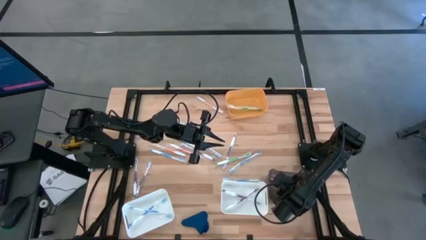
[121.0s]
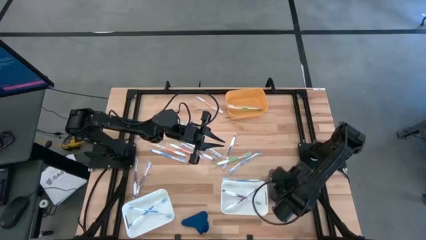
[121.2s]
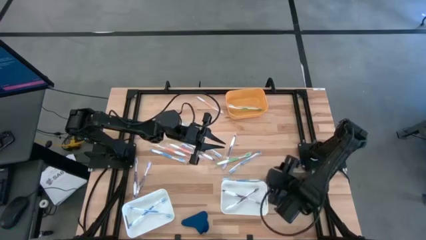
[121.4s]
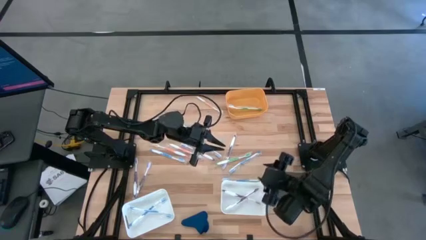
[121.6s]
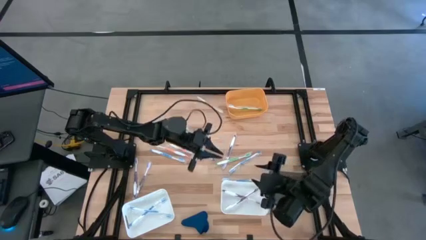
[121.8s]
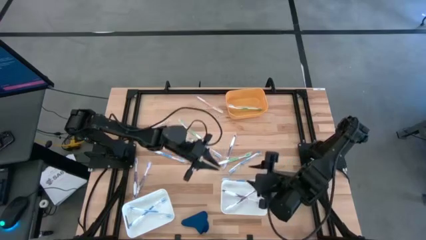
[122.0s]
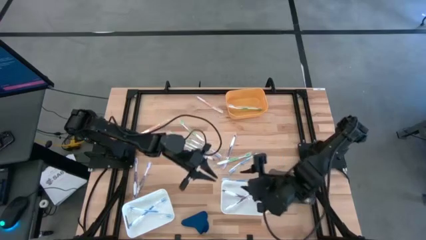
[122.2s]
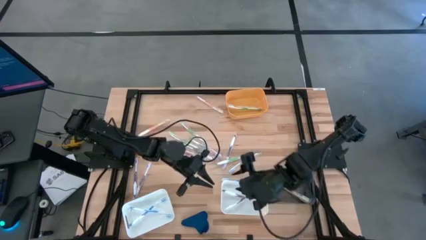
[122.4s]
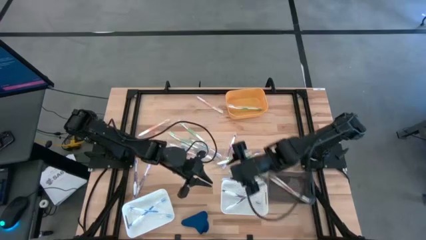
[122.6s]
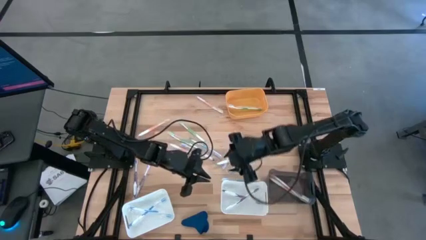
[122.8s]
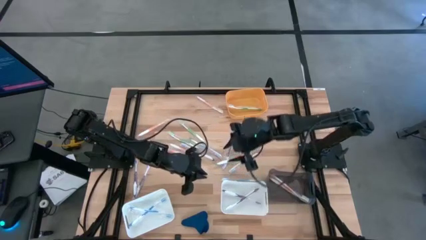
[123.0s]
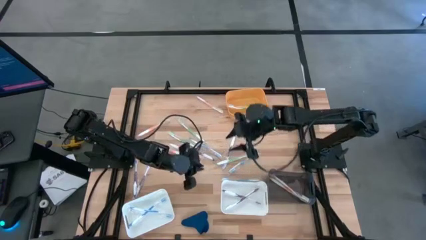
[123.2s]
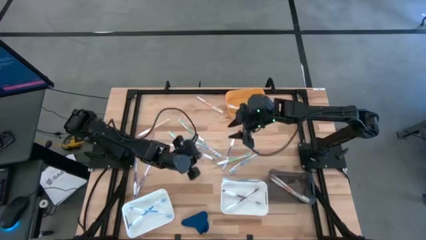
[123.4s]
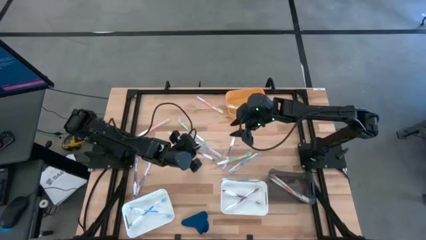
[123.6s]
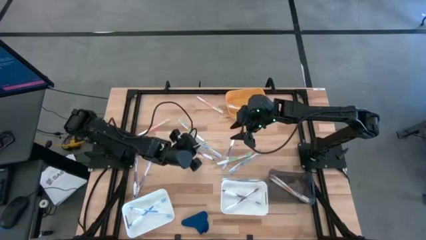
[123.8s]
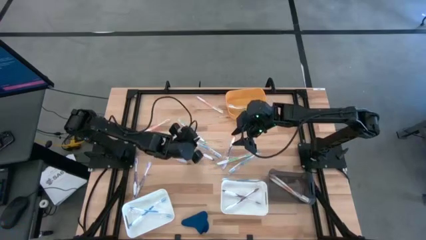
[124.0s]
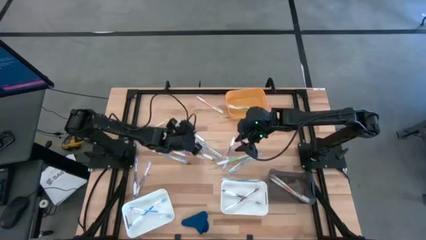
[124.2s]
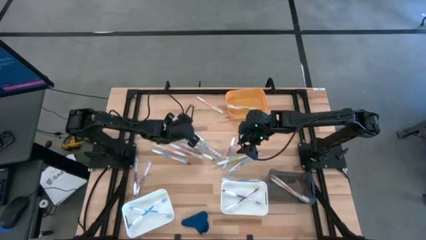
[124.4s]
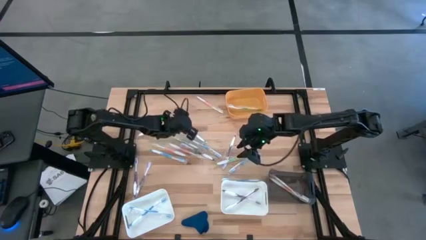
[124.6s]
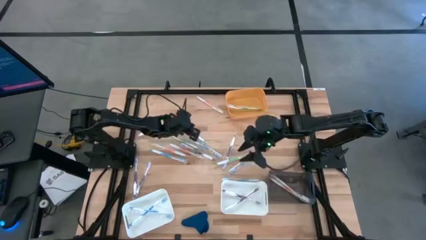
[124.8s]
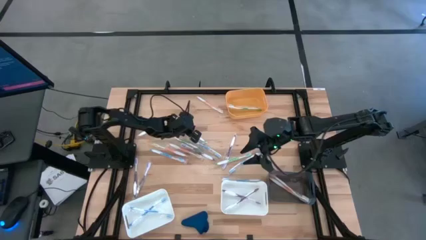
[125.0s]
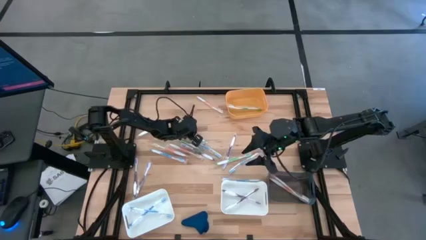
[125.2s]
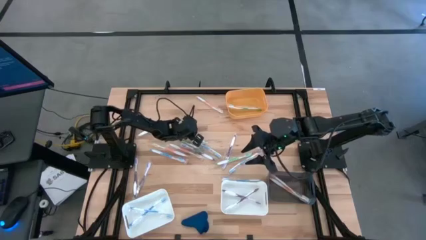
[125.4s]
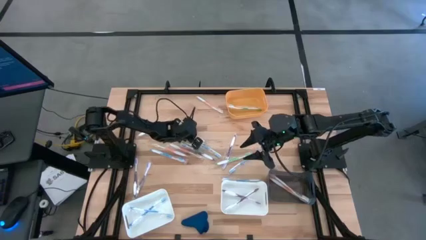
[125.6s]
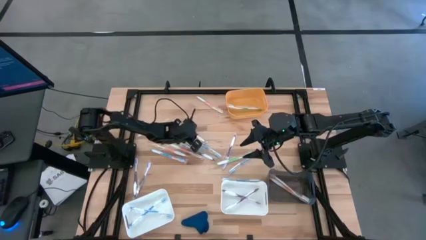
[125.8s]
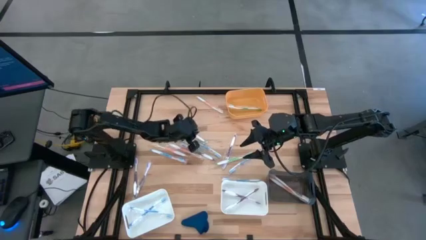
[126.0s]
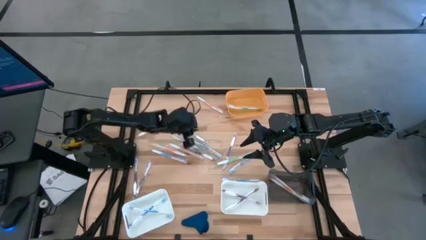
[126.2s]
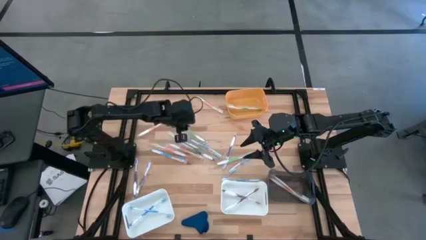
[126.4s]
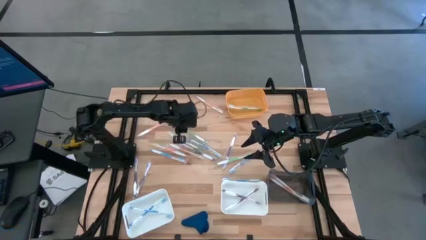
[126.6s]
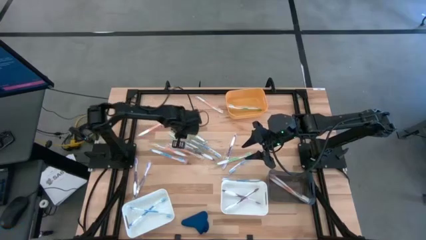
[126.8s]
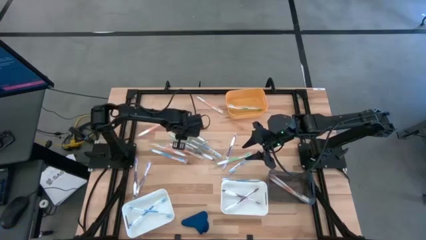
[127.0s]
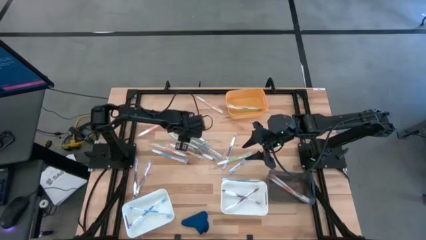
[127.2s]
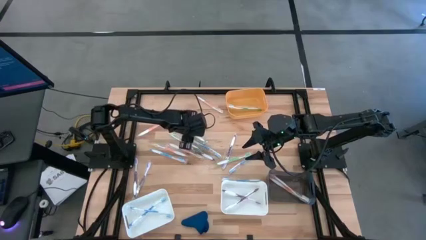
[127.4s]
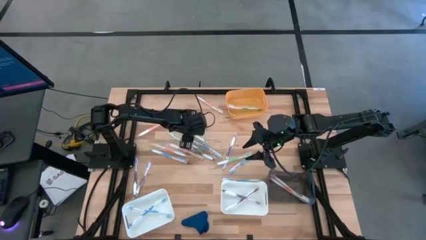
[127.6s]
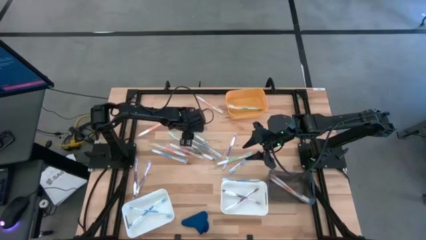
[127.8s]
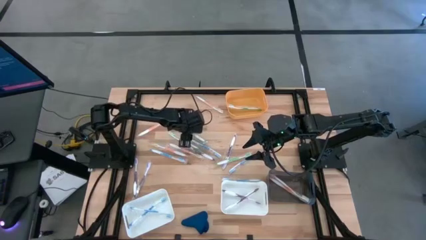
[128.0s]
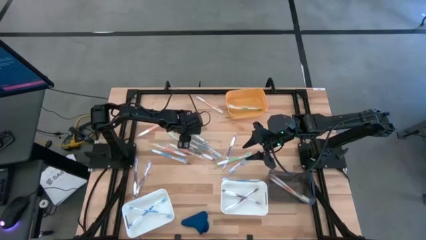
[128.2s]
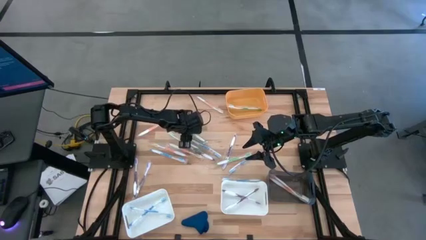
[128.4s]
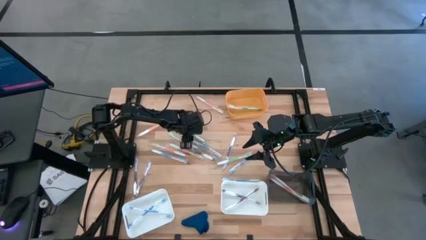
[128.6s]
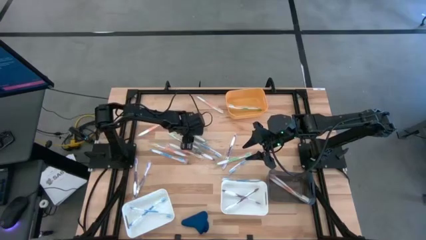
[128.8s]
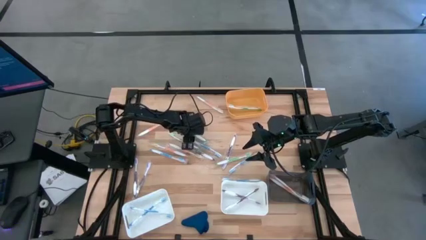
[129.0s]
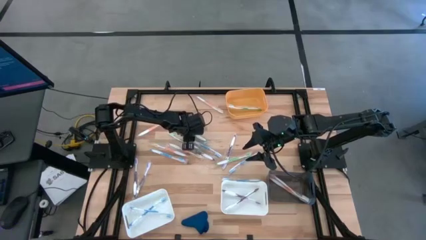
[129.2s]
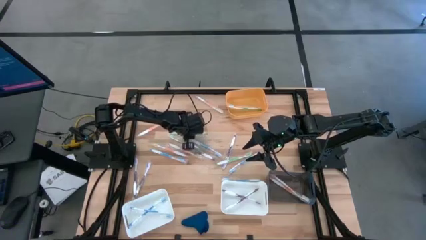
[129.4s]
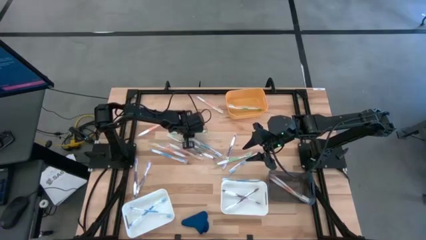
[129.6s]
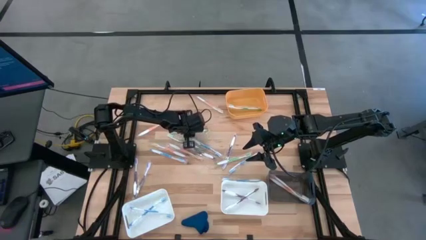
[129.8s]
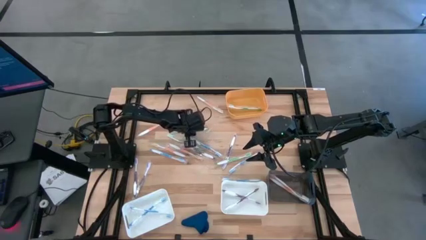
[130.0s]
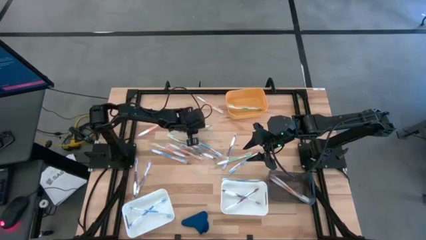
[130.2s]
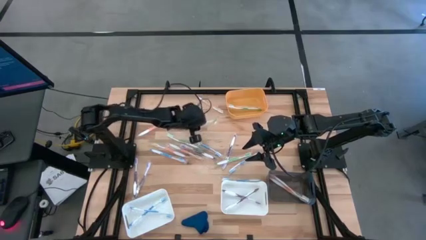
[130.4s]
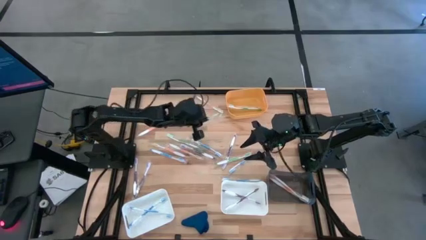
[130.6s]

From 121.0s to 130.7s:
Task: Pick & Place Toothbrushes
Put the green toothbrush into the yellow bin

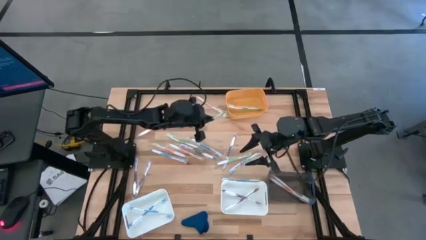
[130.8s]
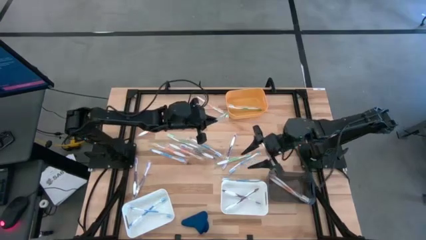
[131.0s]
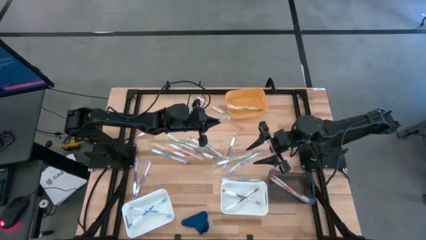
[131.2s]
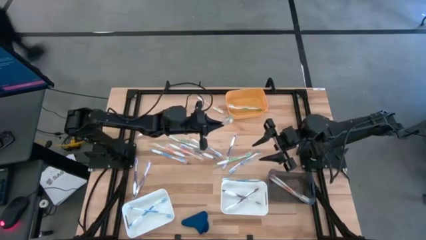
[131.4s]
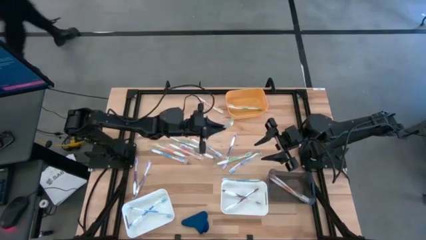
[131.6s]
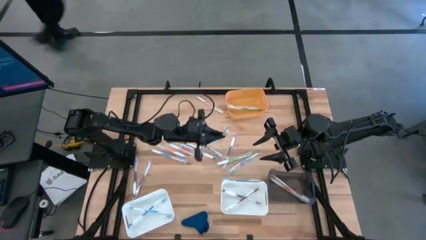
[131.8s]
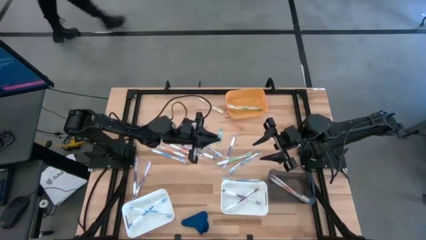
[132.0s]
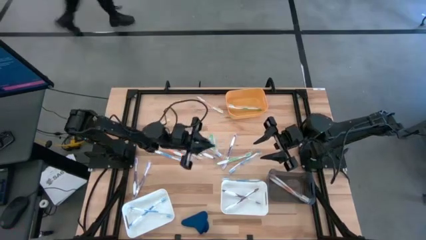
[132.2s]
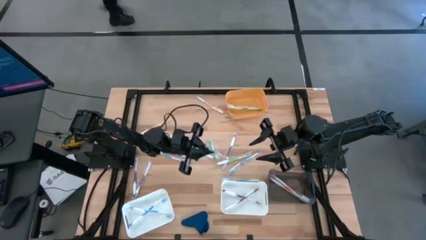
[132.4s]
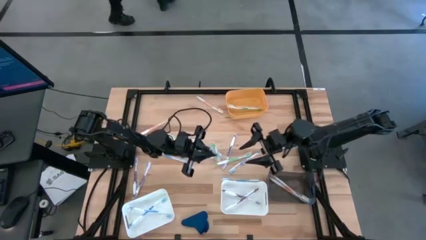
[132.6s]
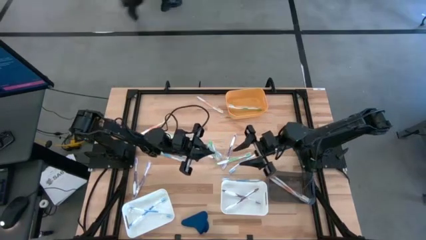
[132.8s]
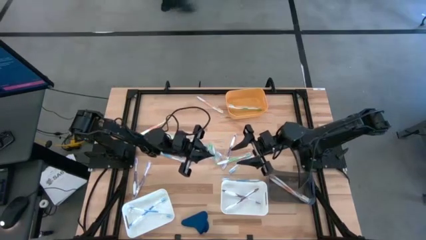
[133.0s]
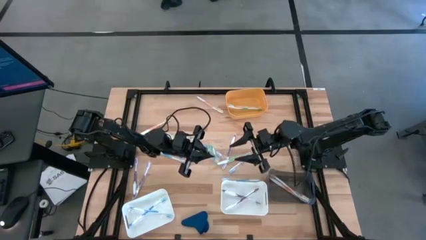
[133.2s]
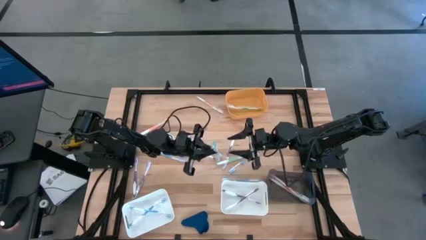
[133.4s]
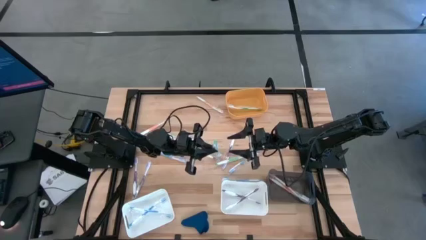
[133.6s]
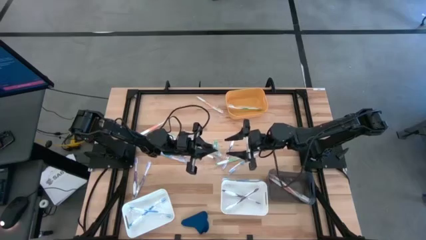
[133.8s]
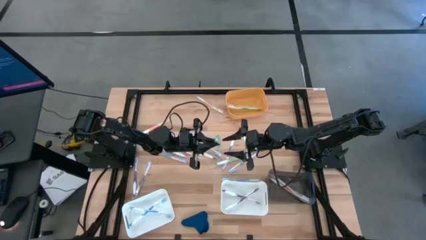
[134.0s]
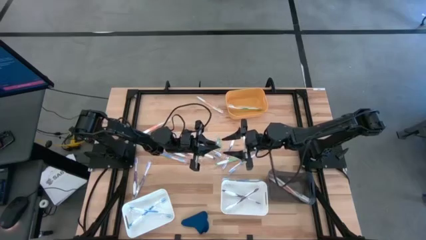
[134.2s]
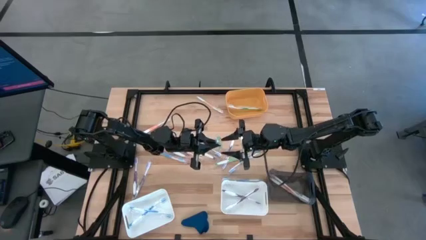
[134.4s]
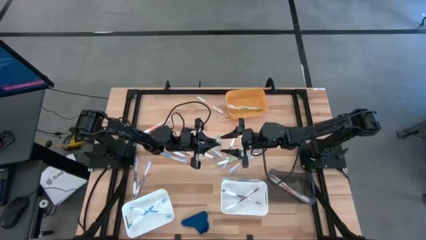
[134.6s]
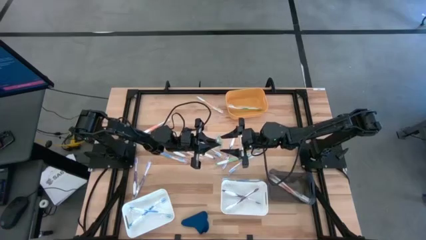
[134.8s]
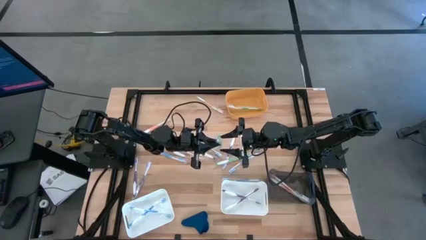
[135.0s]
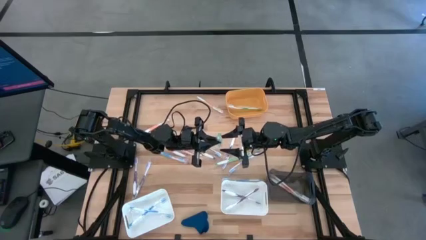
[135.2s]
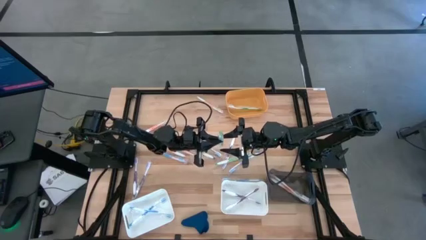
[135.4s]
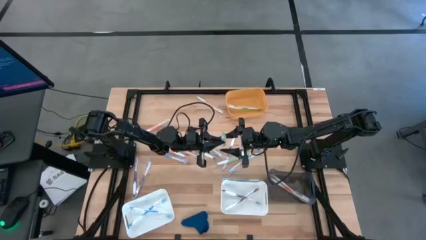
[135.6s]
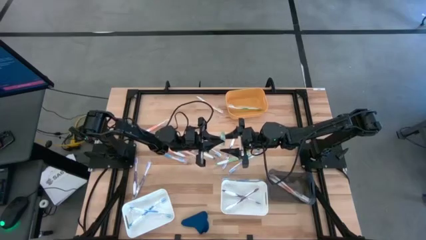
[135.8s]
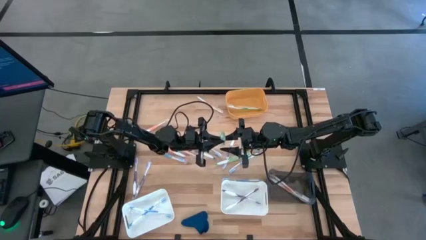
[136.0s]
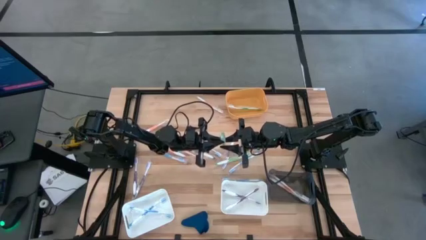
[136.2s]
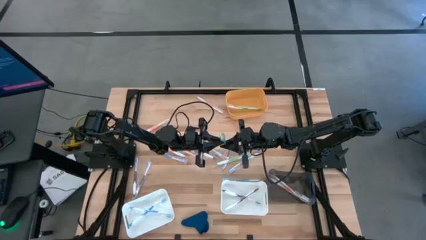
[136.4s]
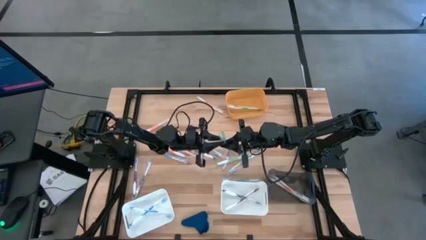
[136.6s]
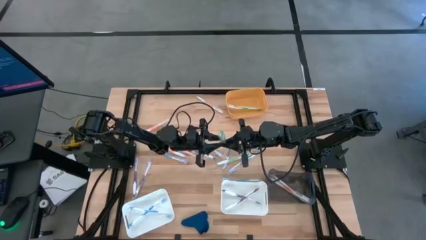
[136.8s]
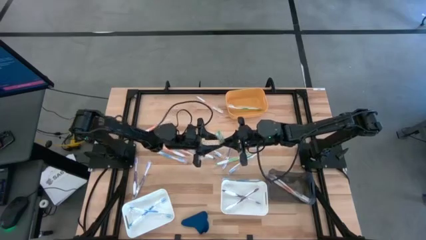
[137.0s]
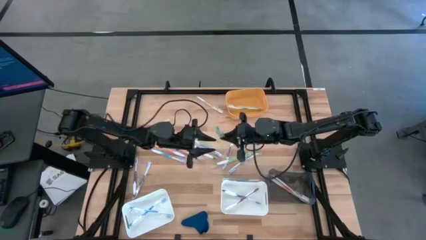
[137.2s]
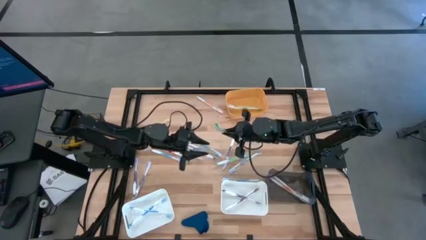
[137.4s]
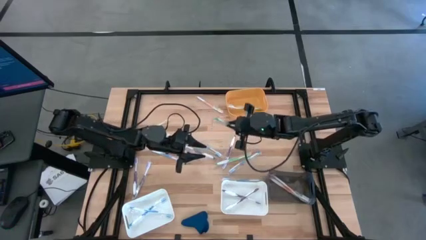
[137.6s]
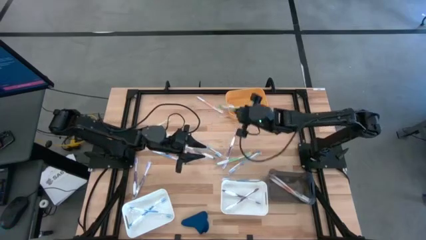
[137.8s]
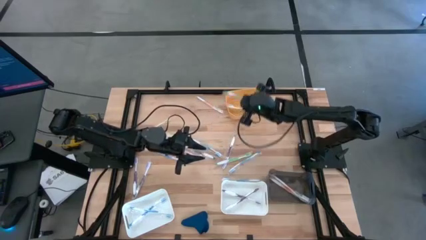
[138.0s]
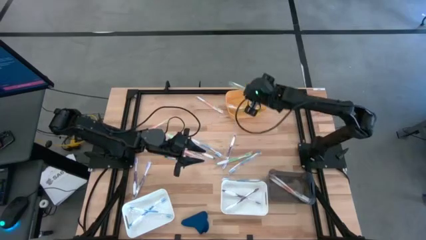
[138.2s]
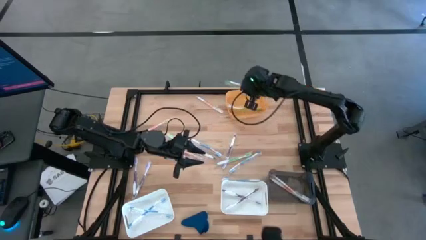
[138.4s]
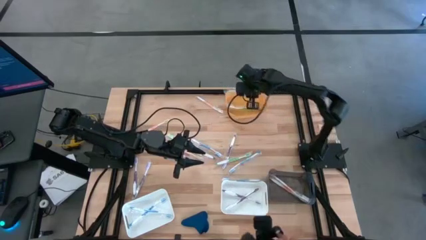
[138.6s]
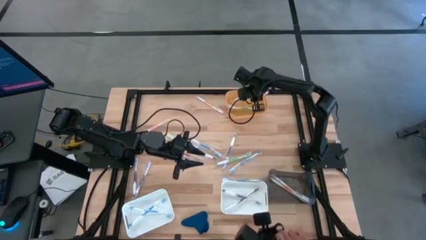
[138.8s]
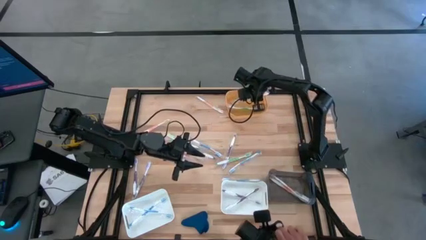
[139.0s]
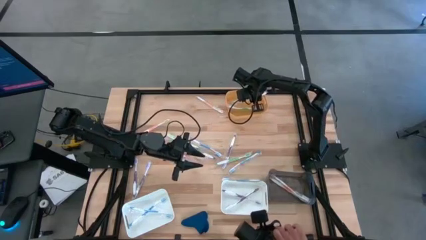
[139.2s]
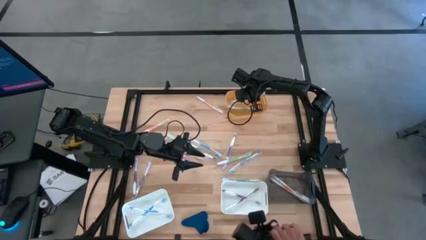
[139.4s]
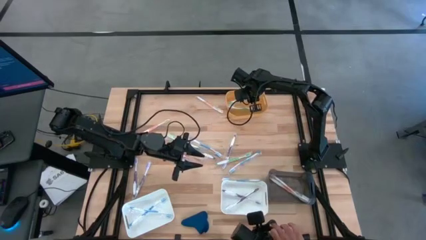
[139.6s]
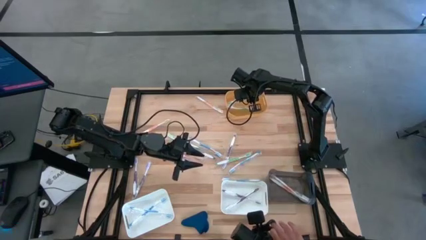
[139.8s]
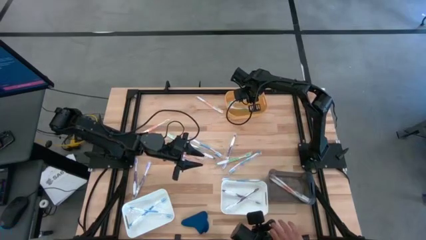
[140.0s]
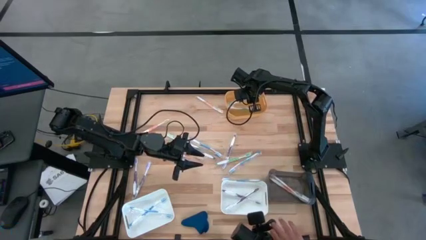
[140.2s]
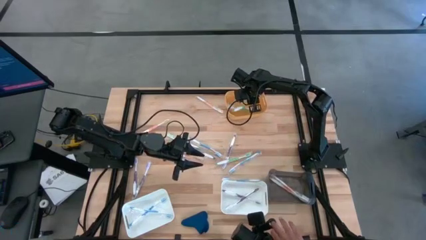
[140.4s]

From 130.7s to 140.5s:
Put the green toothbrush into the yellow bin
